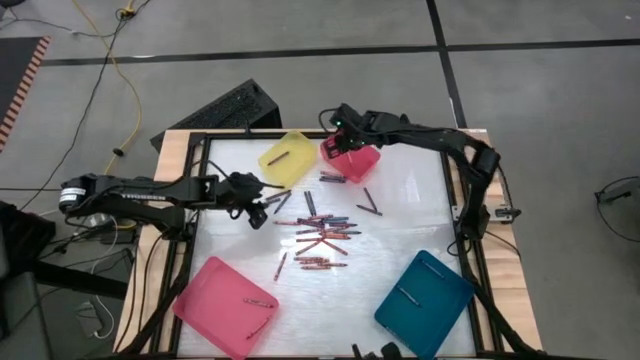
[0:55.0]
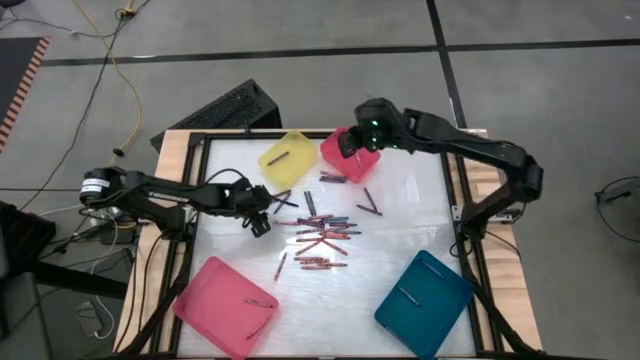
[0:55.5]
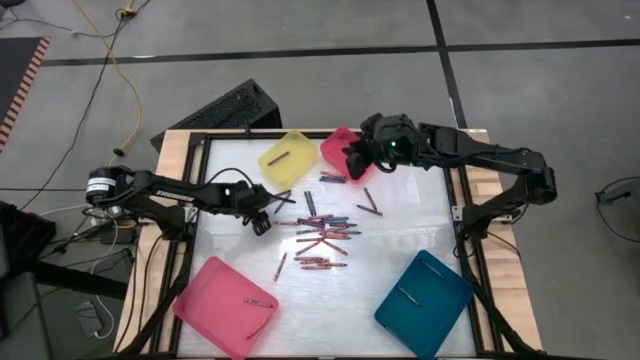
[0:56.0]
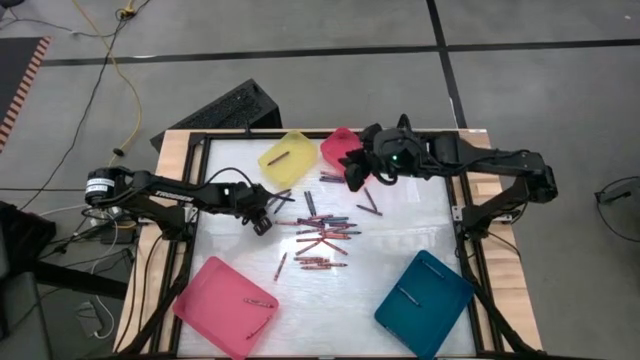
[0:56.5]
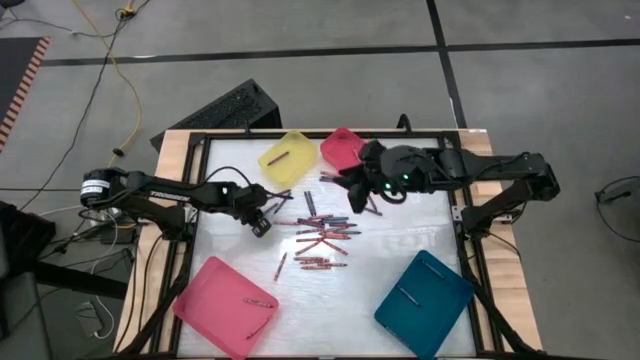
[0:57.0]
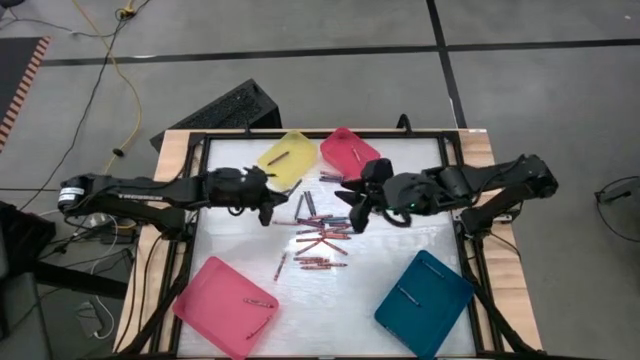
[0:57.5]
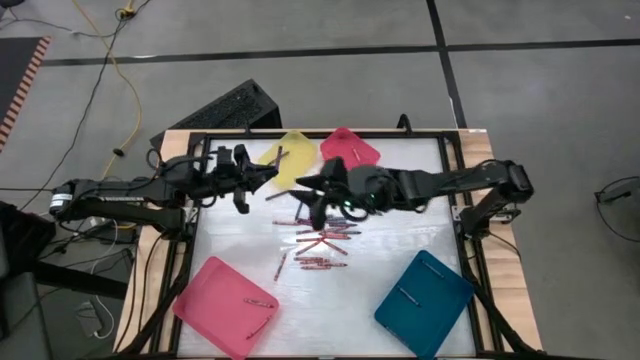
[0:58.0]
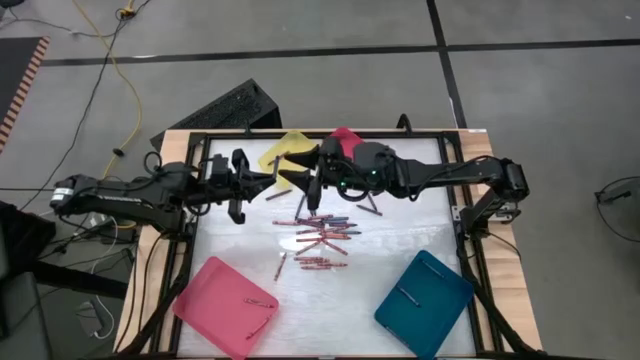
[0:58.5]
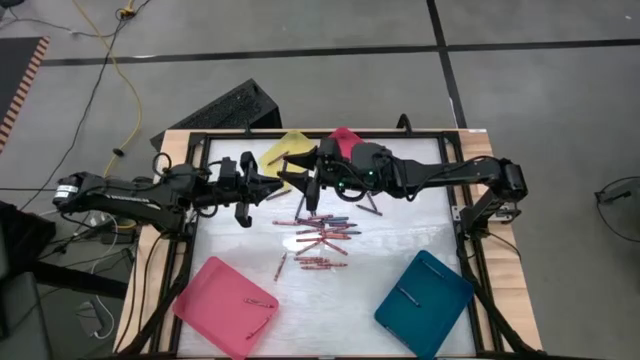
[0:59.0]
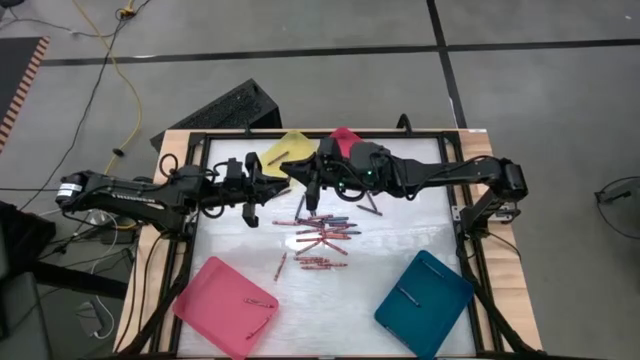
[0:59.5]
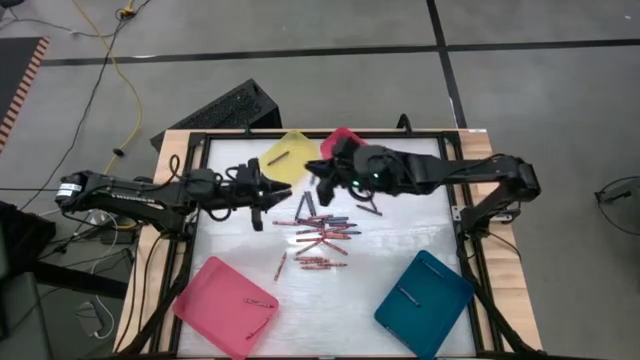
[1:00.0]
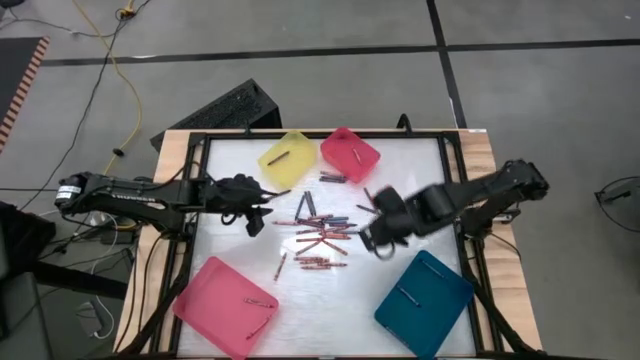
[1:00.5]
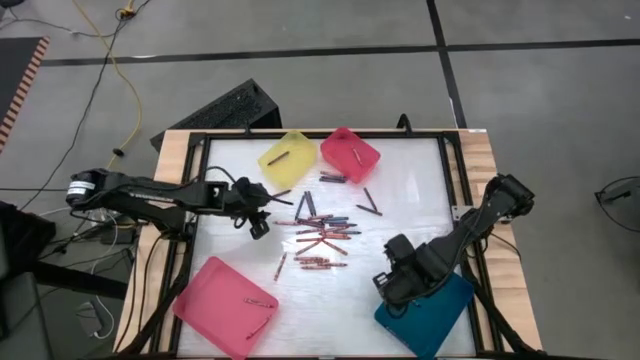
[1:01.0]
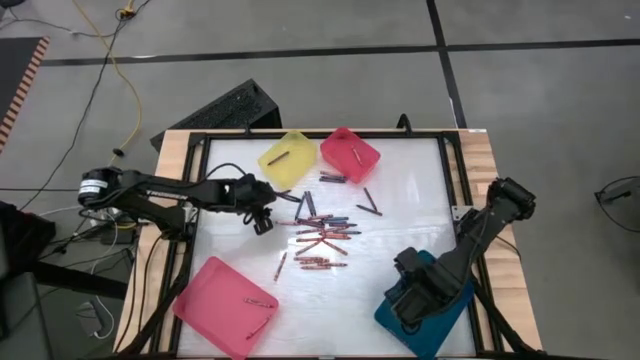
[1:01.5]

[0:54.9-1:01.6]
Task: Sort crayons
Put the blue crayon into the blue bin

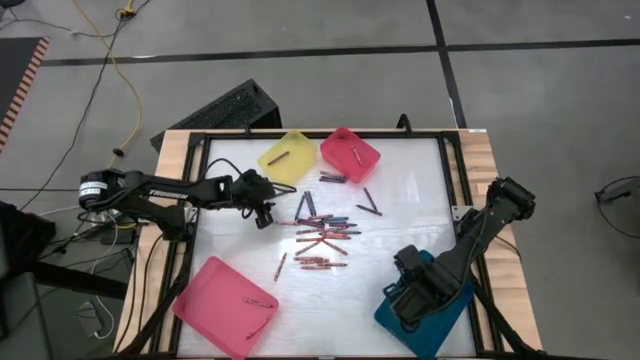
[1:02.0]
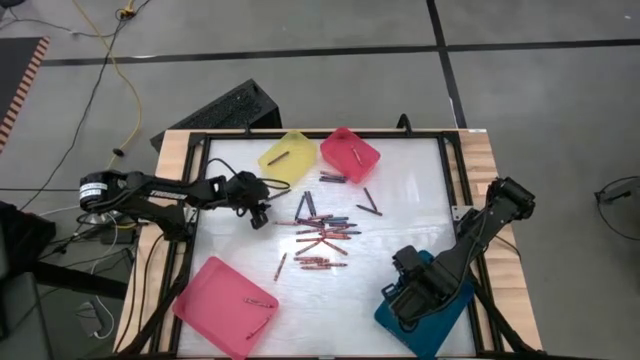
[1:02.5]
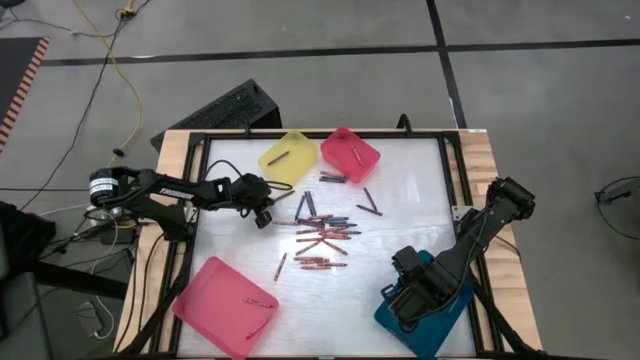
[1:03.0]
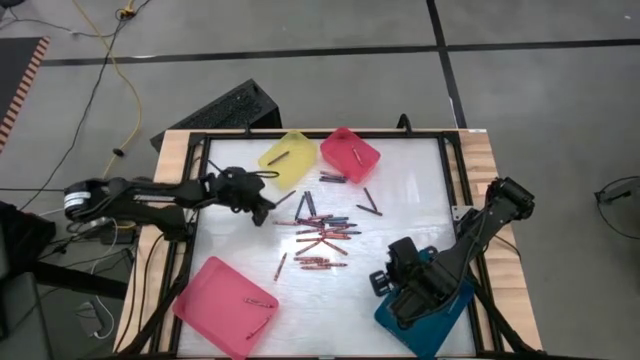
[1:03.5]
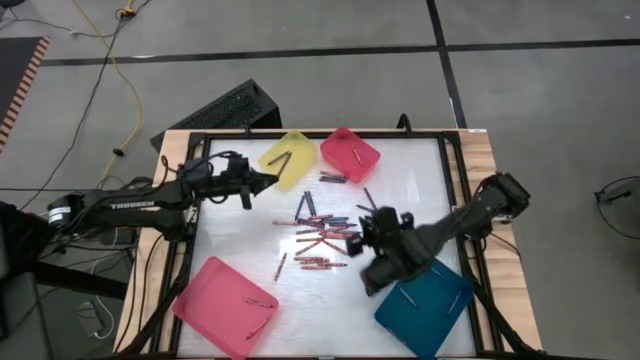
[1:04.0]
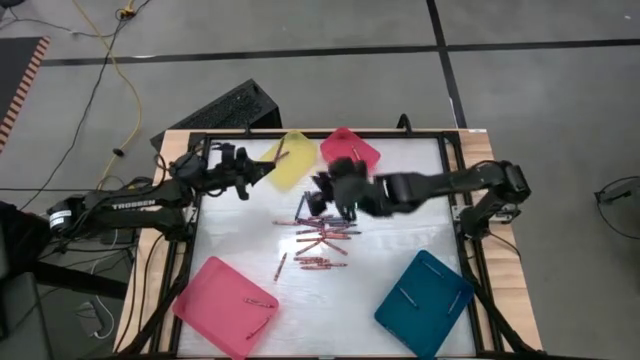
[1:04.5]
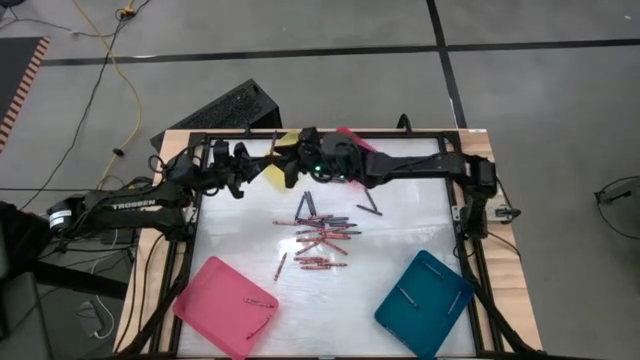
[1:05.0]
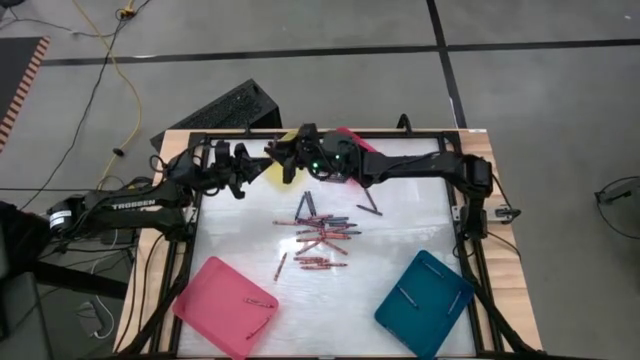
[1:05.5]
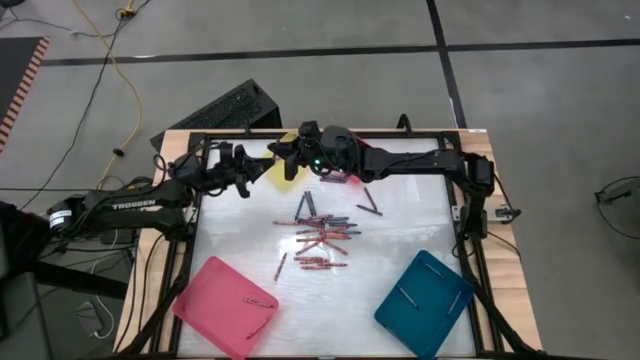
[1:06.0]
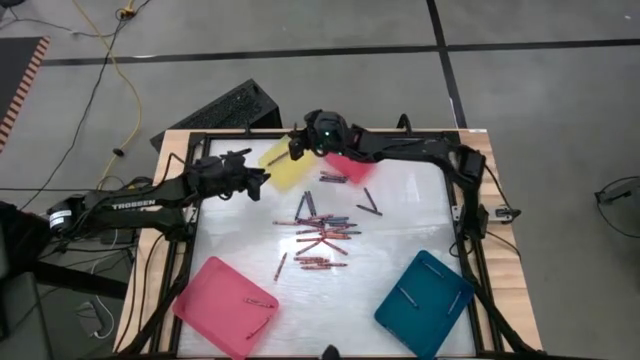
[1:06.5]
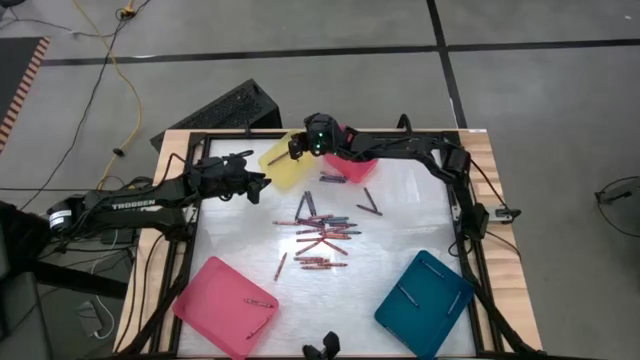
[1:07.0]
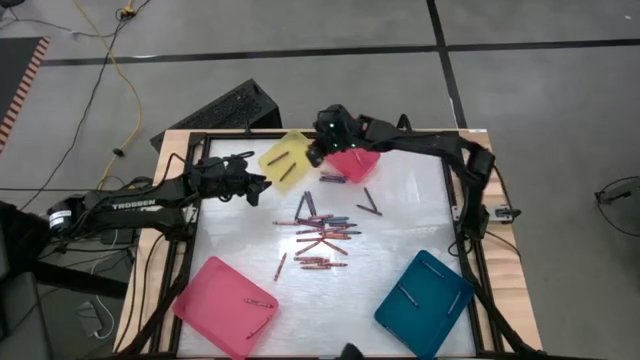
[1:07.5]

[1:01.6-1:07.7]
Put the purple crayon into the yellow bin

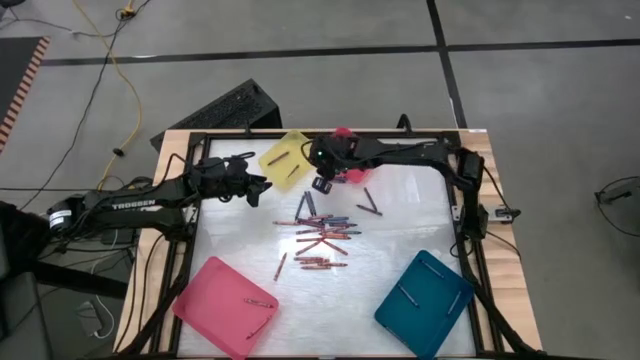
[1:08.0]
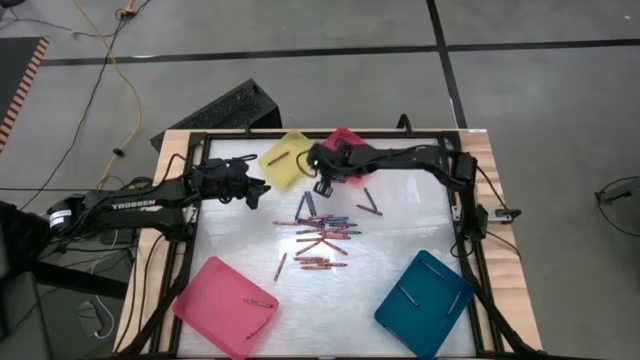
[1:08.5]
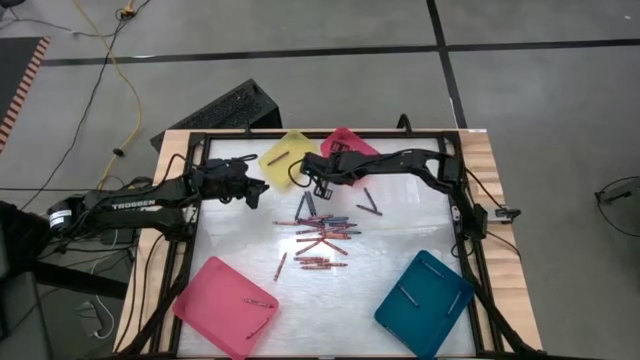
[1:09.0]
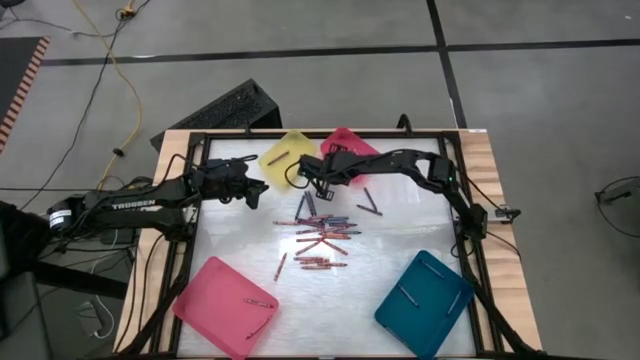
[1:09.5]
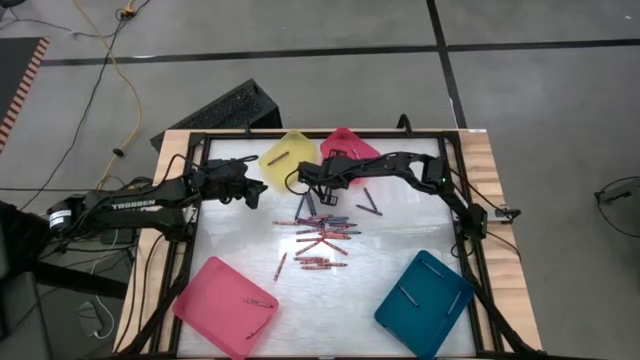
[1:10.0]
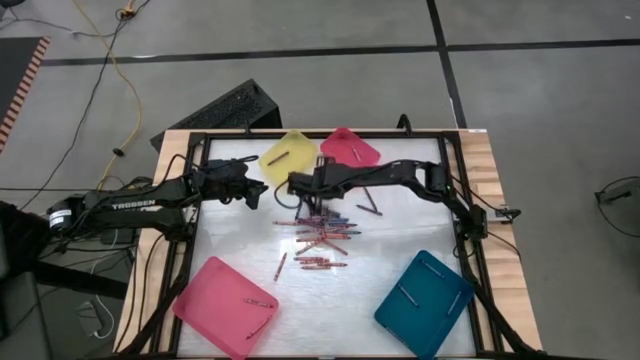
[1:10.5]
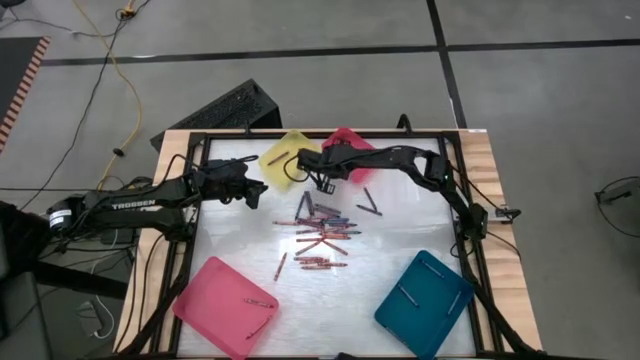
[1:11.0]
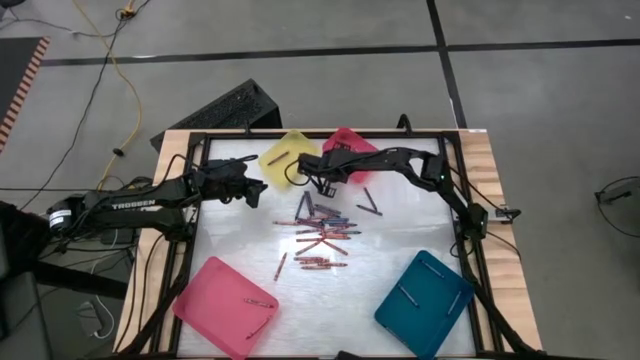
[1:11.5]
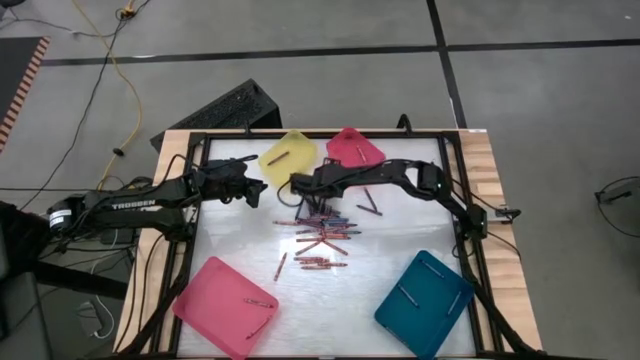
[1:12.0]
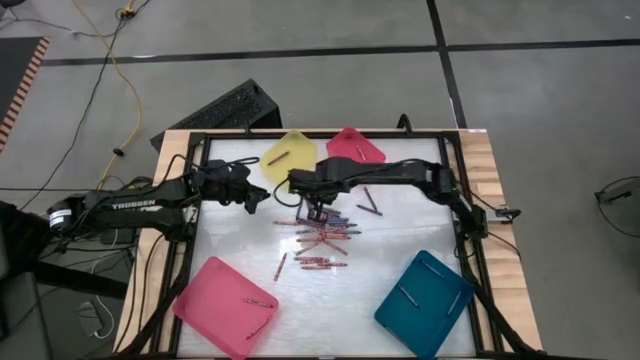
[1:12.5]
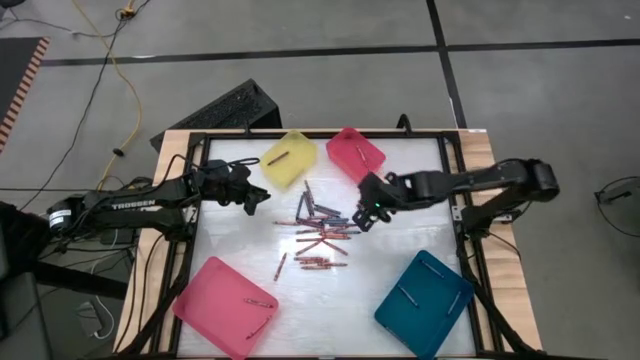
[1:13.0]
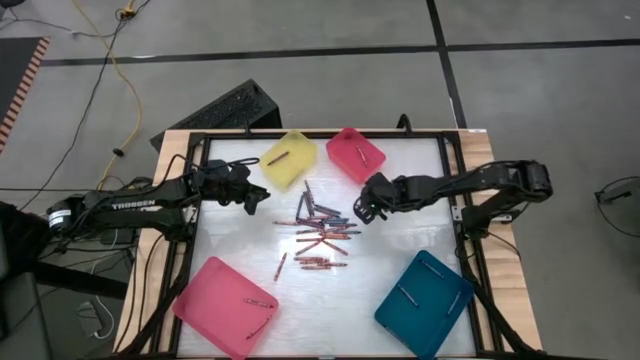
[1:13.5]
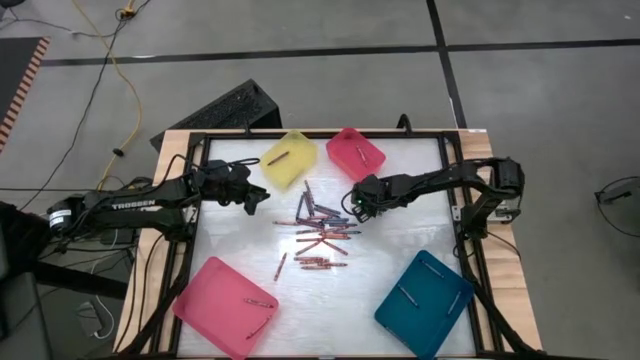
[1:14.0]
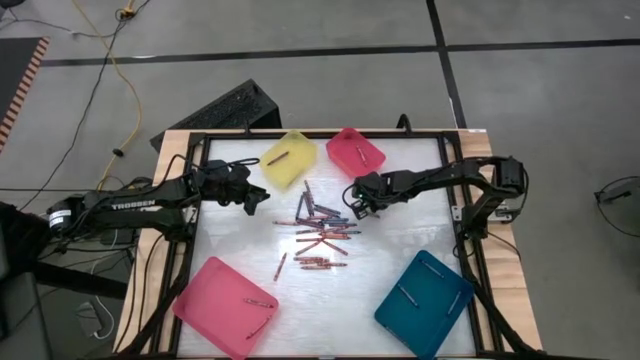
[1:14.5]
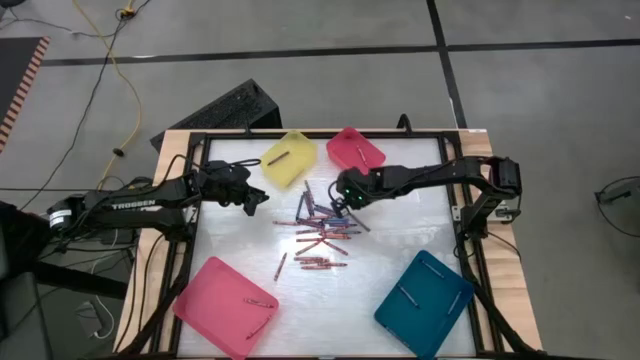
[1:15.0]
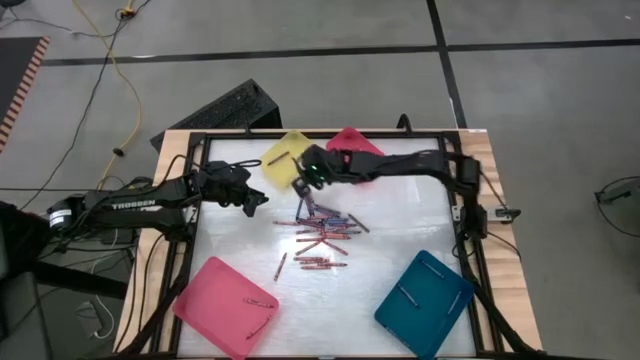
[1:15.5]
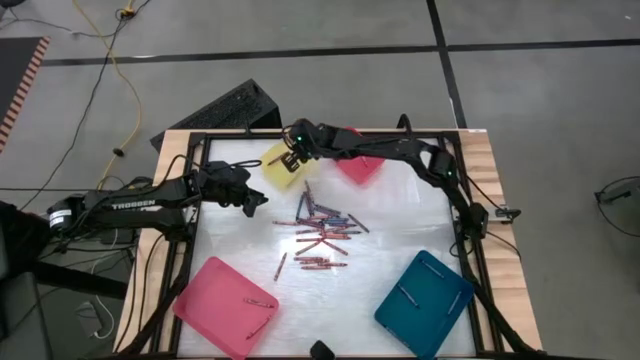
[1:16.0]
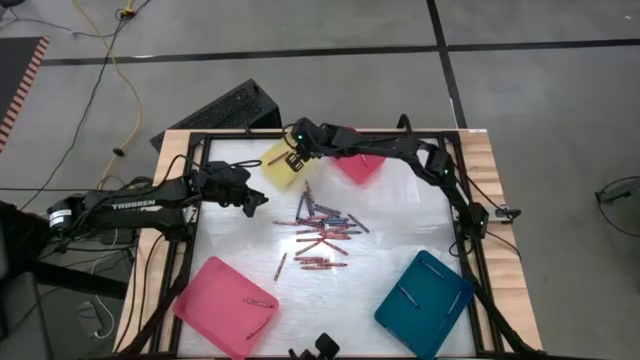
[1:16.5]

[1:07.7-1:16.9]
Put the purple crayon into the yellow bin
